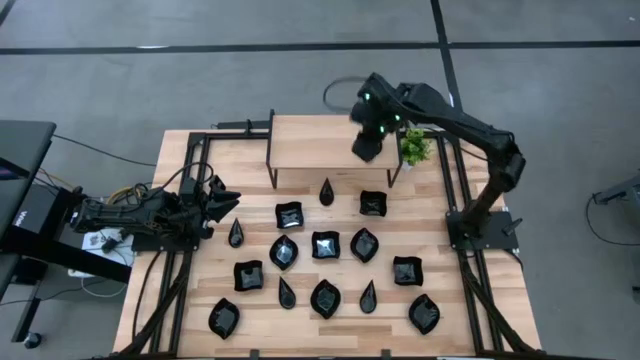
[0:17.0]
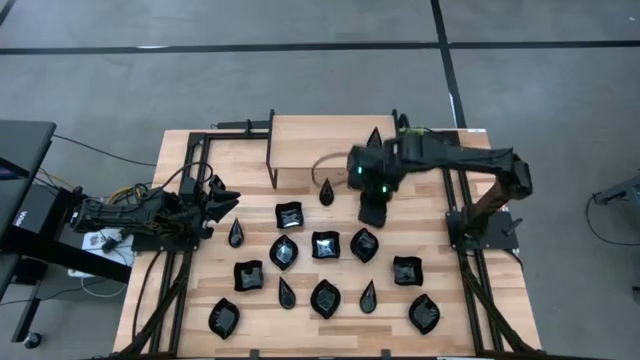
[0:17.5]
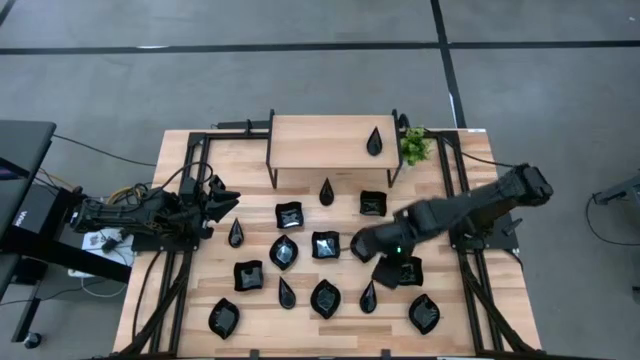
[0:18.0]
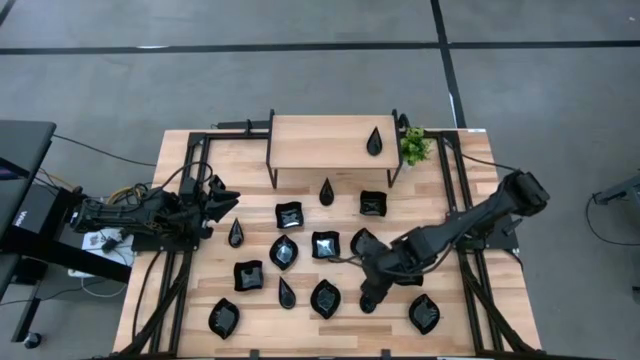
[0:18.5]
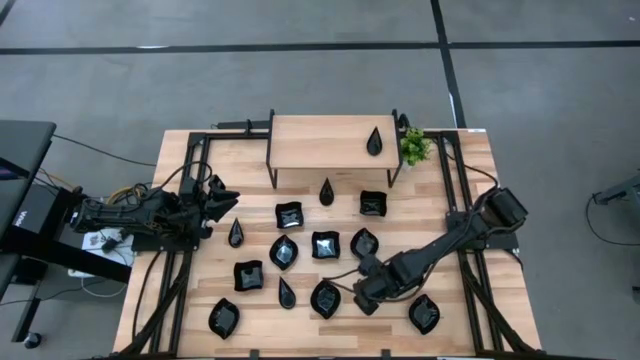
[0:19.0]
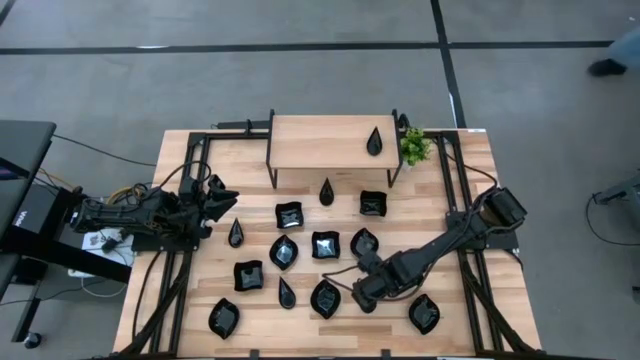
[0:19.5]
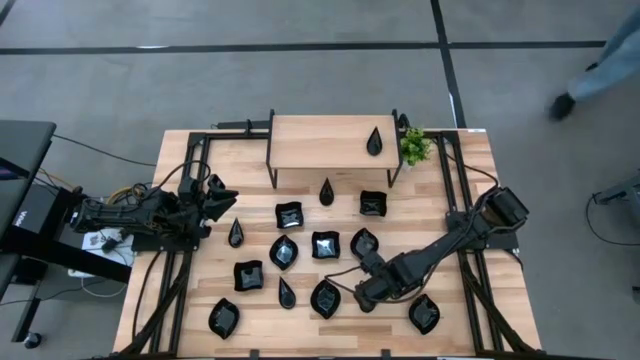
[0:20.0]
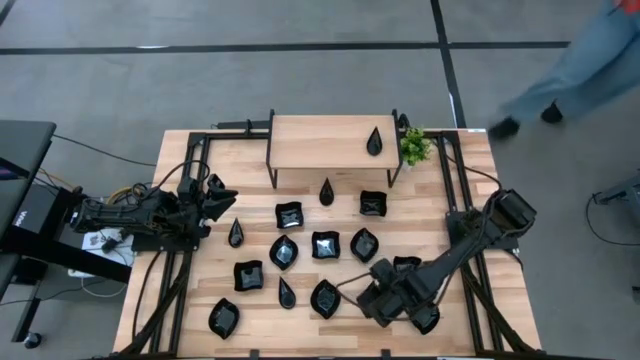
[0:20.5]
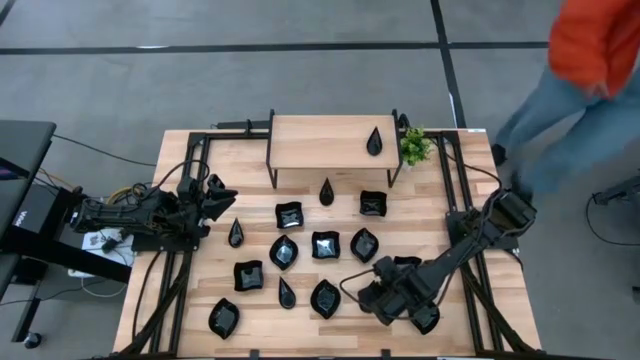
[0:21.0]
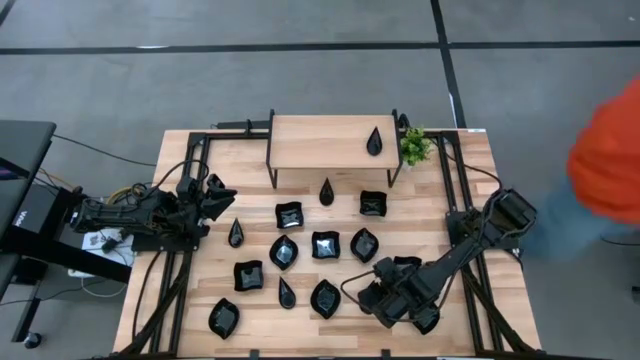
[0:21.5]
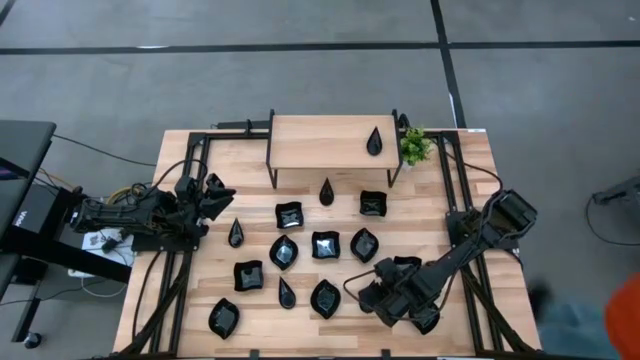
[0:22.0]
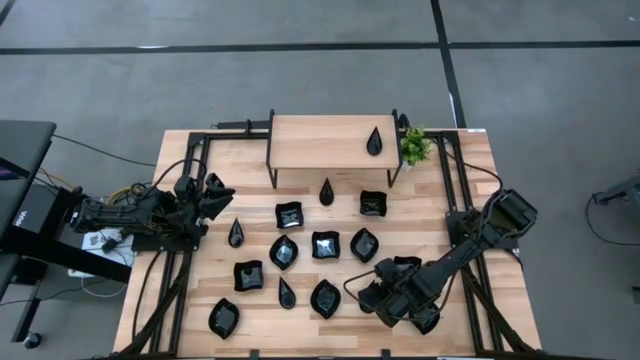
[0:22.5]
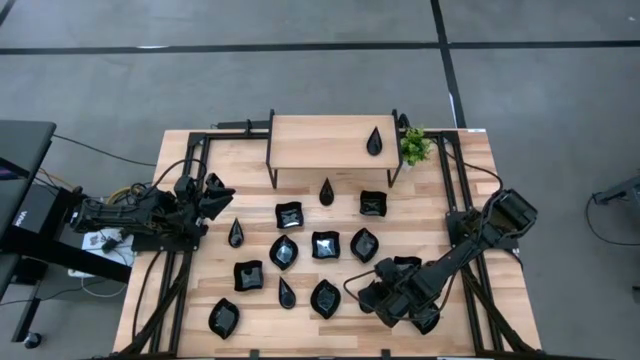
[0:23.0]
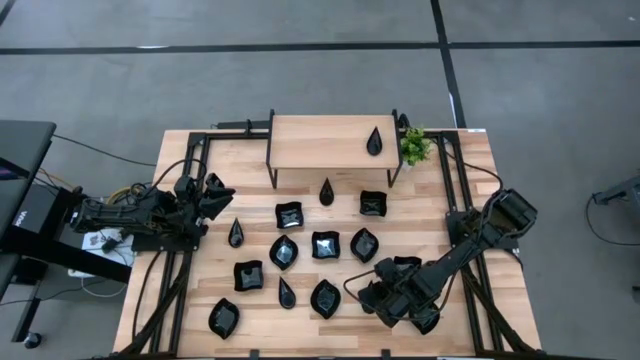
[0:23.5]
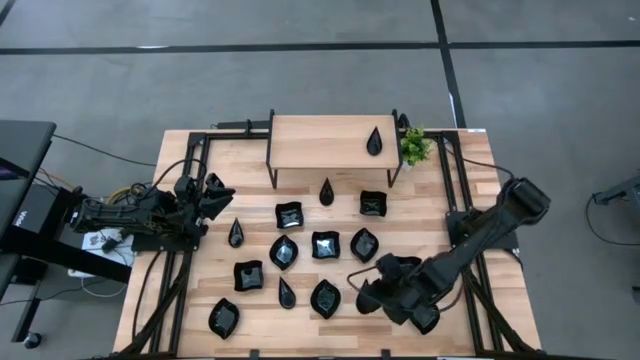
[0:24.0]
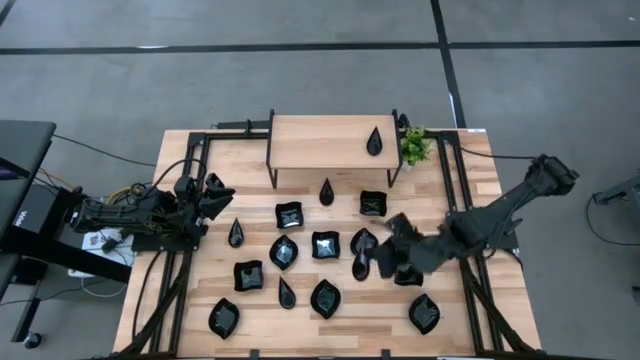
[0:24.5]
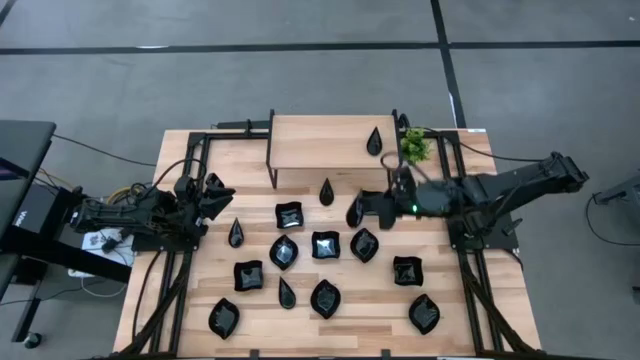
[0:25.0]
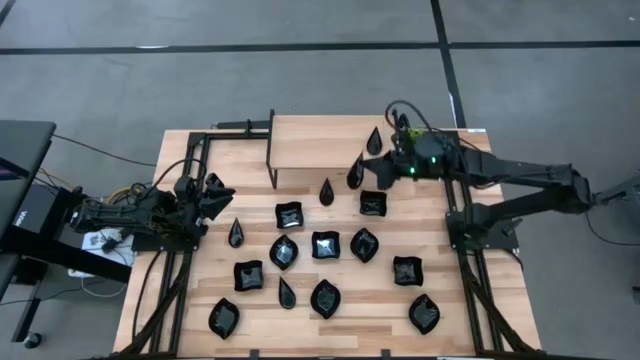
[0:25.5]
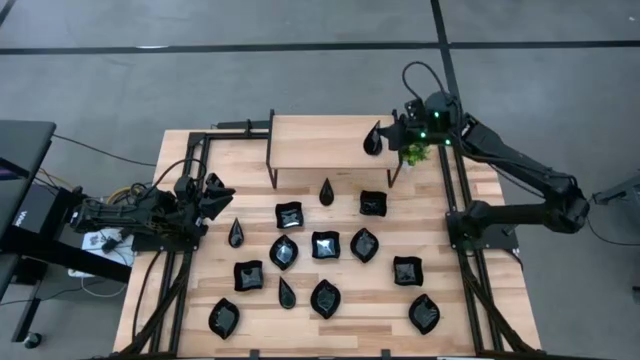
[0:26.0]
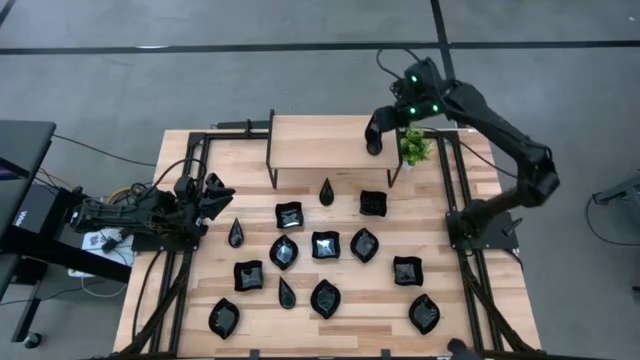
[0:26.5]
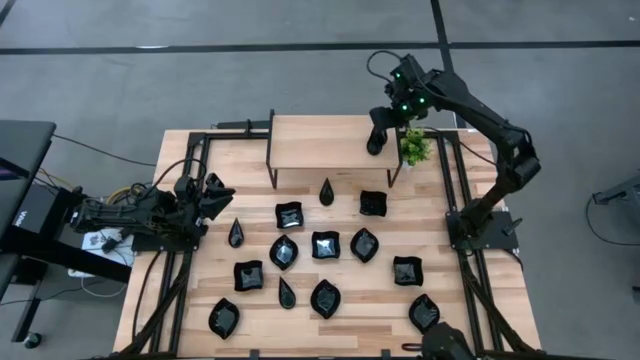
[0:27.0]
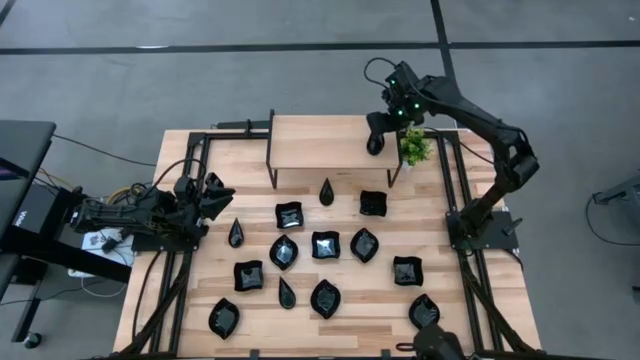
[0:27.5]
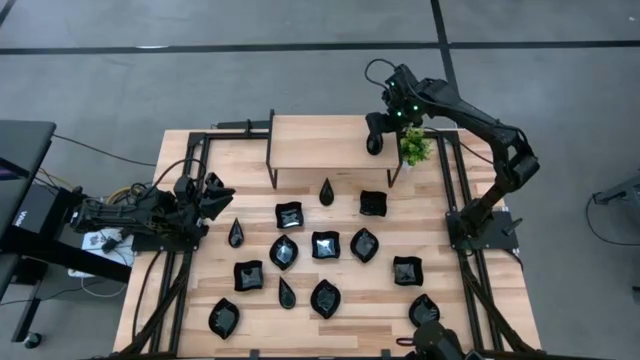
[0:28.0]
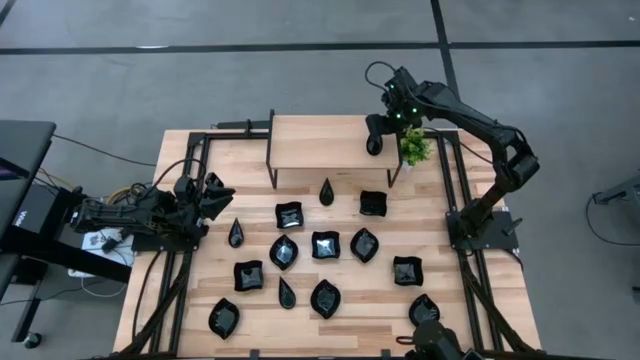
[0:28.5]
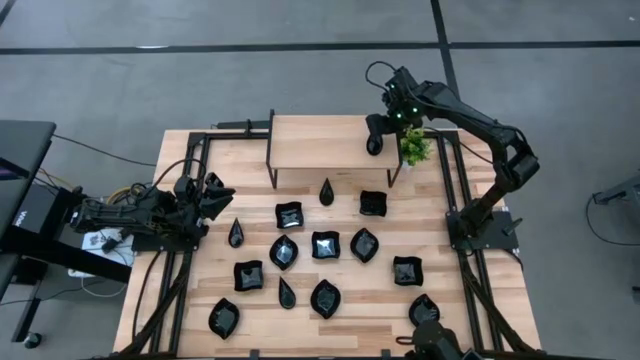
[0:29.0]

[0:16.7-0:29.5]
Task: Pick & Place Mini shaped plates
Stack the drop-shaped plate on top of the drop-shaped plate on the shelf
